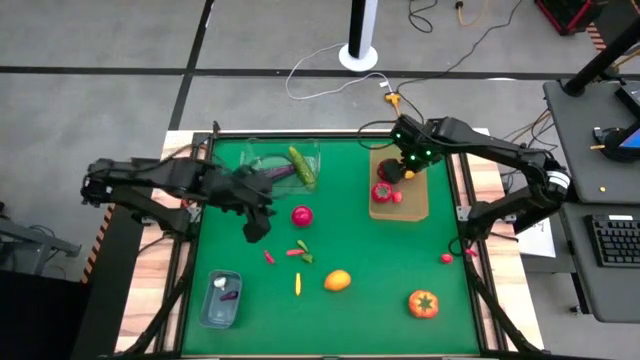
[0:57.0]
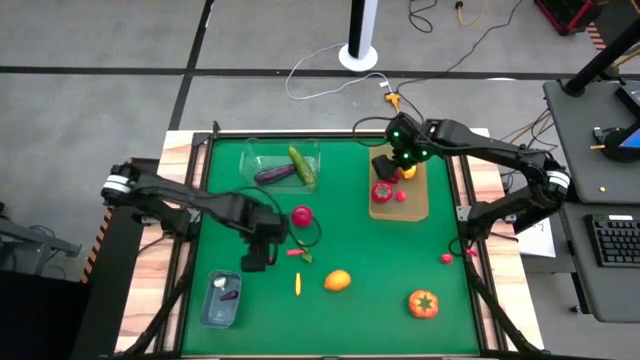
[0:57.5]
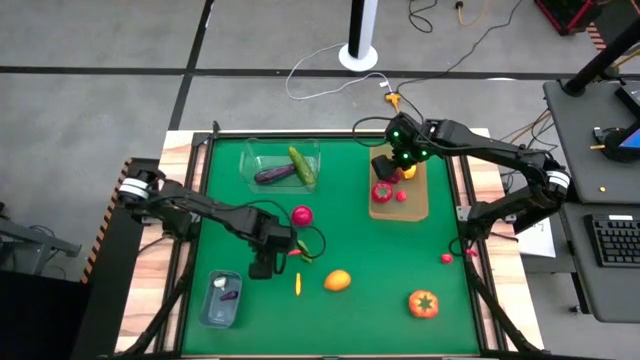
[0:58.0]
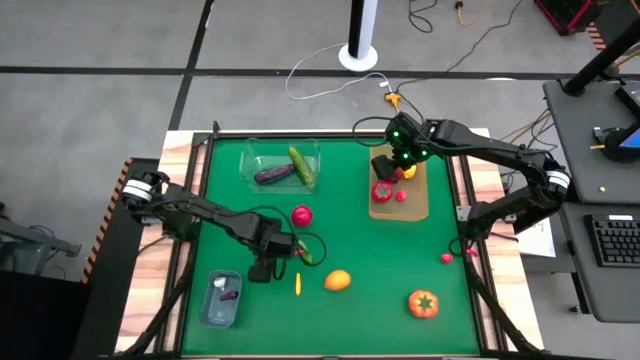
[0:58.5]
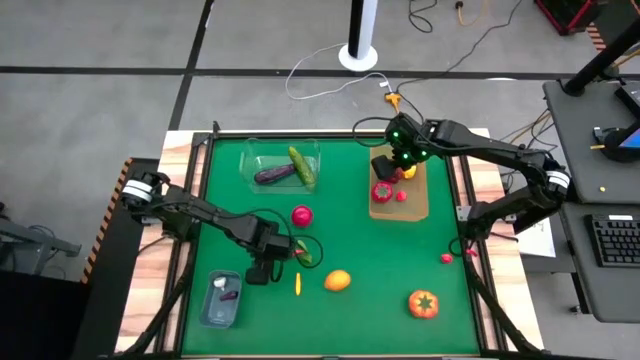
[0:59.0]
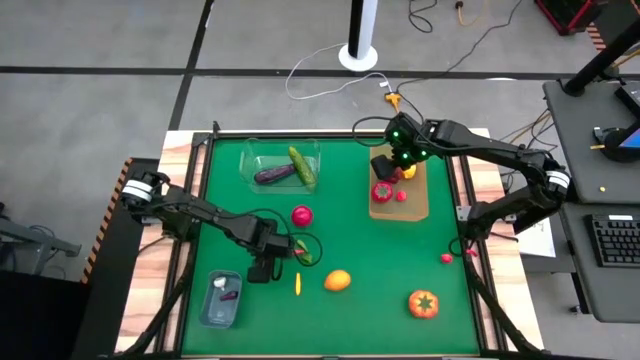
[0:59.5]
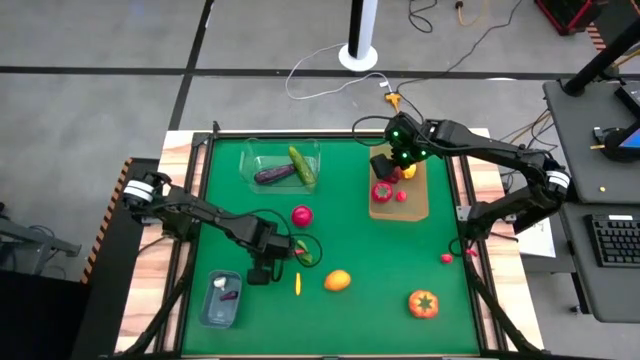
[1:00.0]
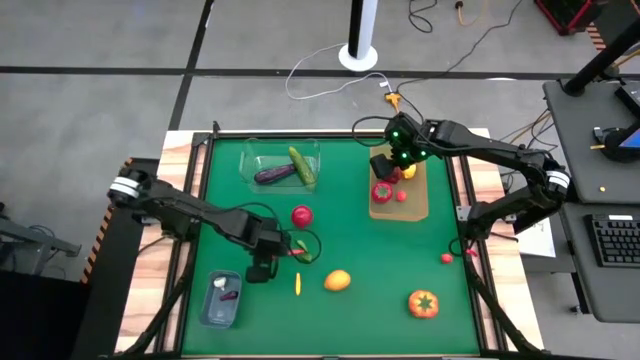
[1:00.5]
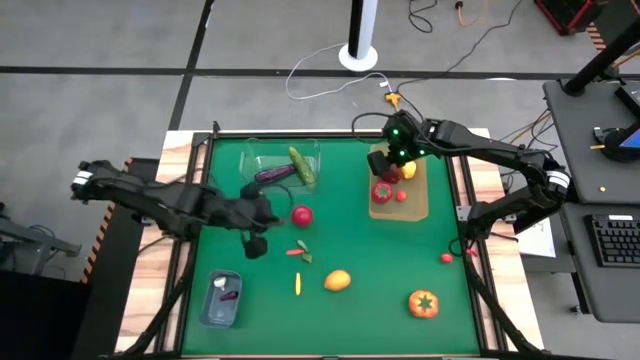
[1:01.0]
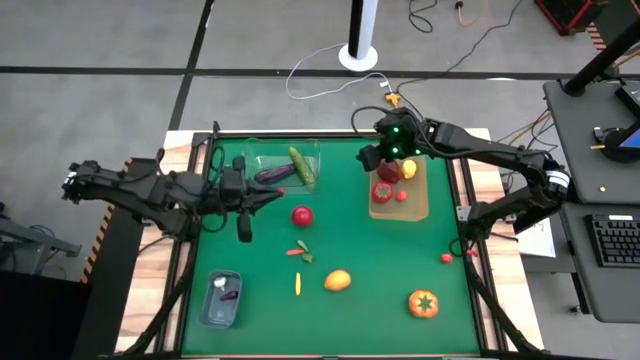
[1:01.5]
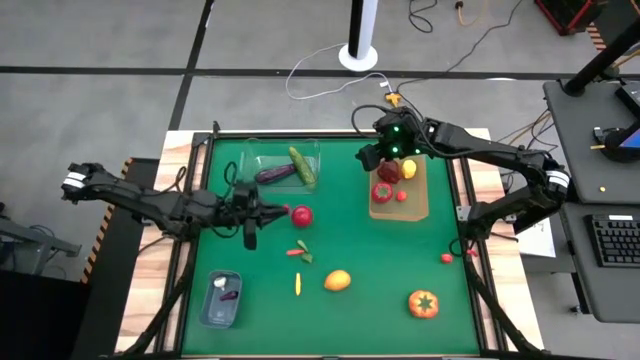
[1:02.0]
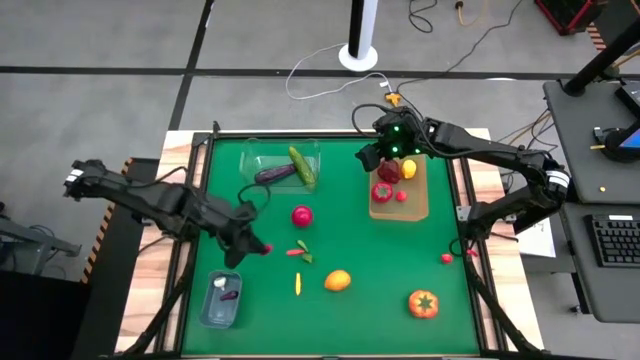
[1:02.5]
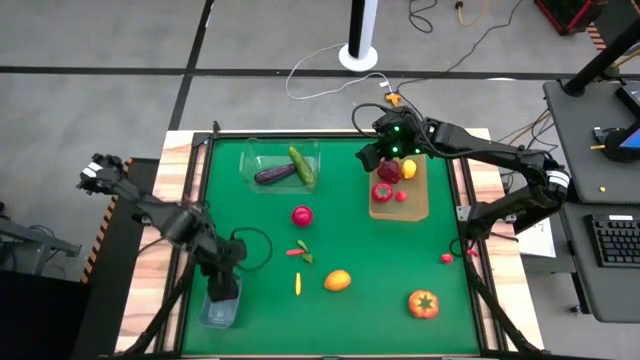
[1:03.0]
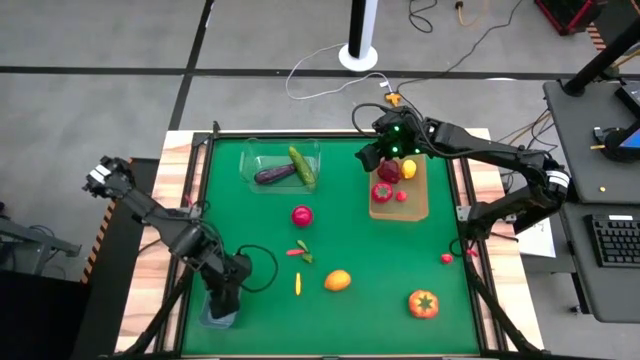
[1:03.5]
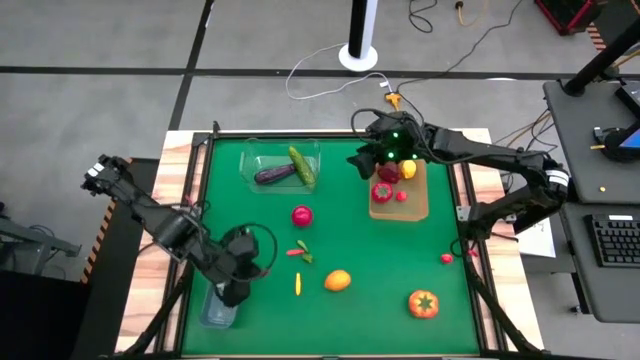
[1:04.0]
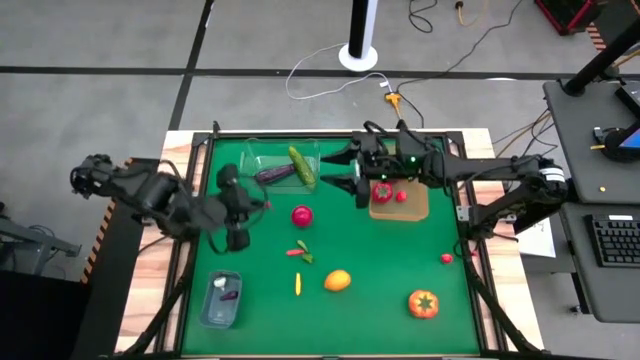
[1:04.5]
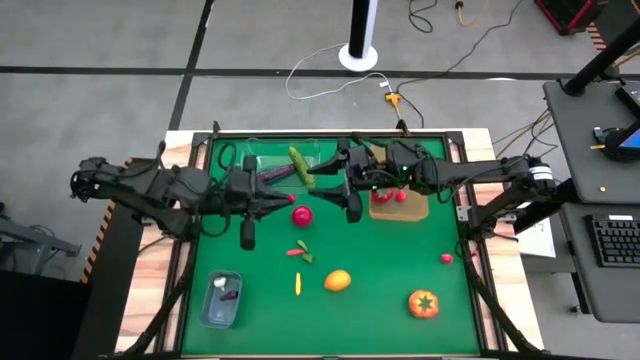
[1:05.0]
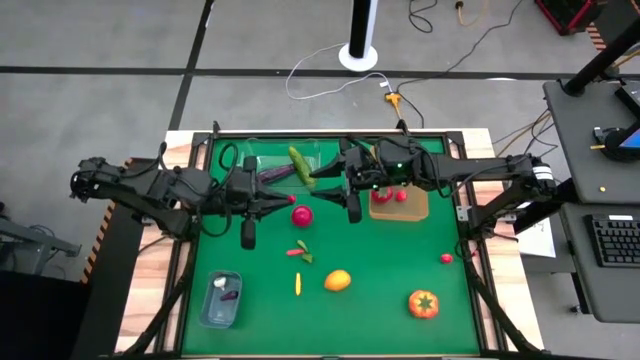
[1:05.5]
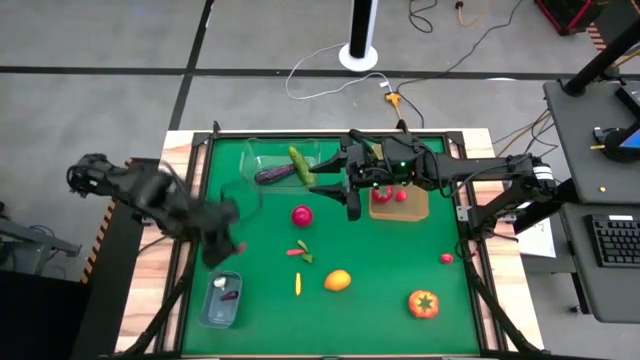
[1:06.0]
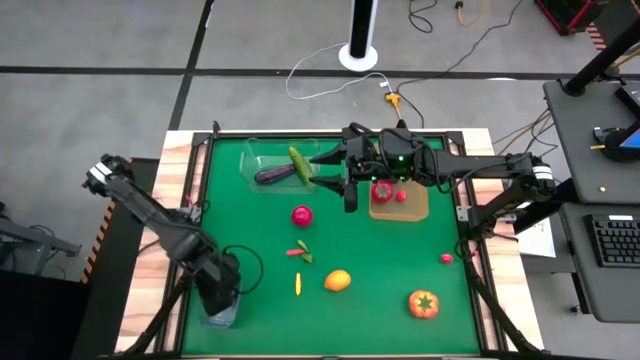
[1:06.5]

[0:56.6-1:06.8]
Task: Sort produce into baskets
Put the red chili pepper into the blue bin

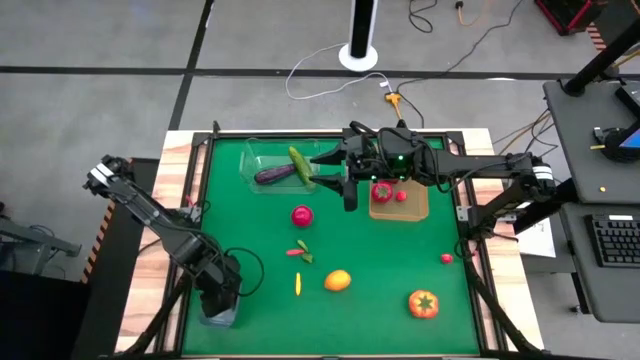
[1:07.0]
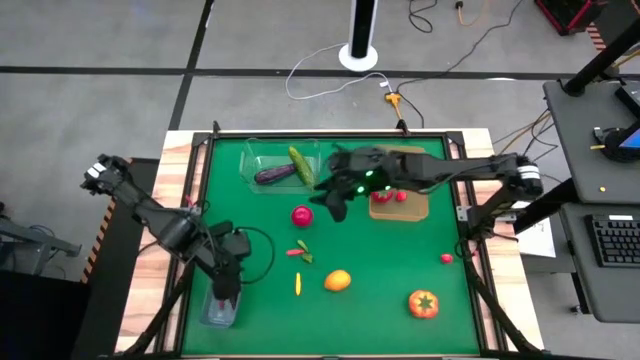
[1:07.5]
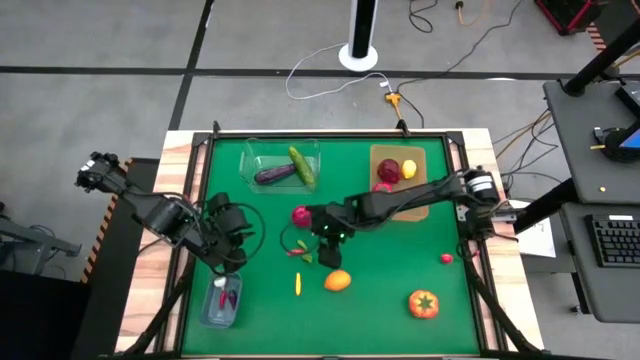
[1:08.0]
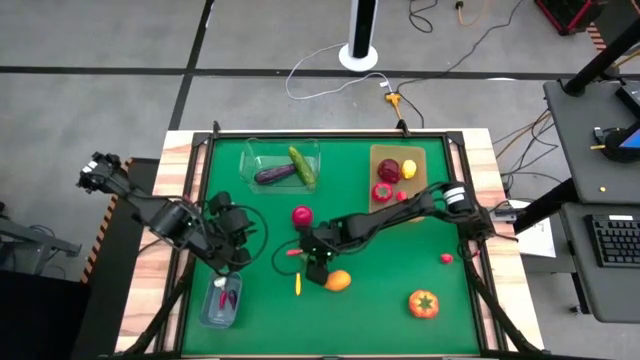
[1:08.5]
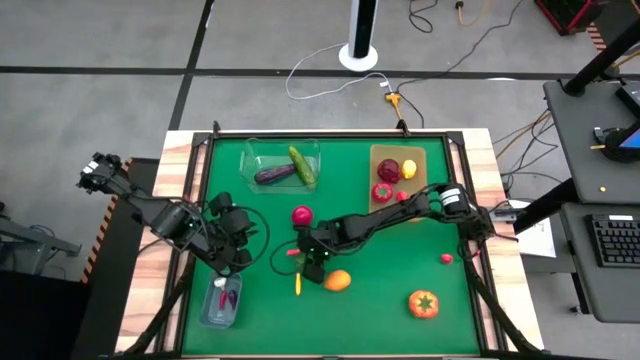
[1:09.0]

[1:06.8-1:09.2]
Put the green bell pepper into the blue bin

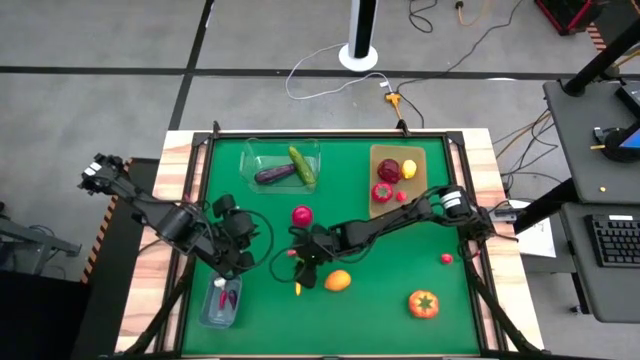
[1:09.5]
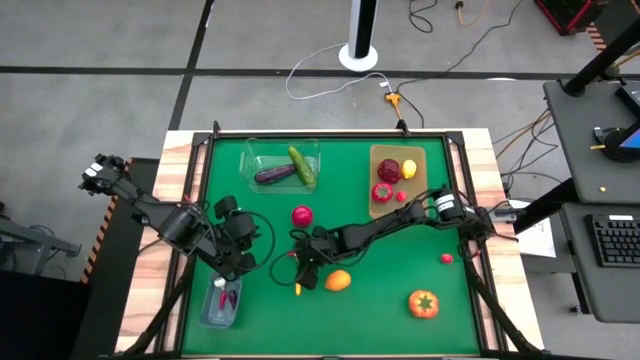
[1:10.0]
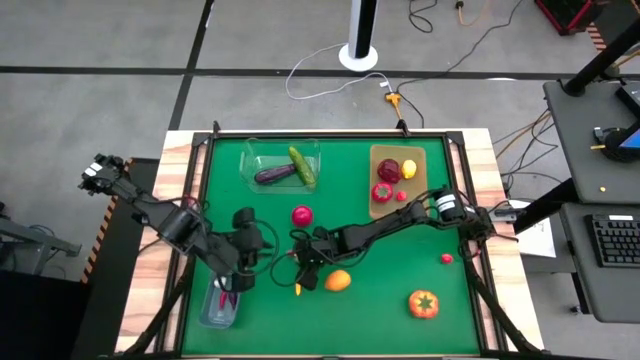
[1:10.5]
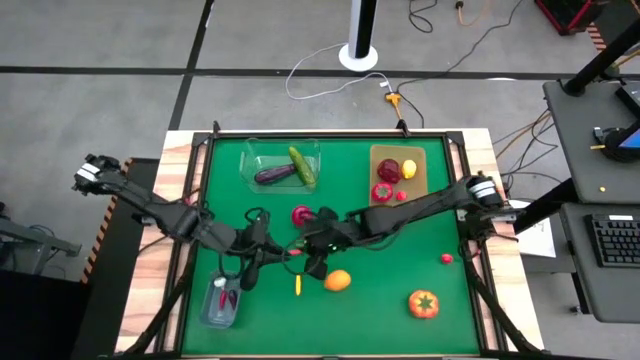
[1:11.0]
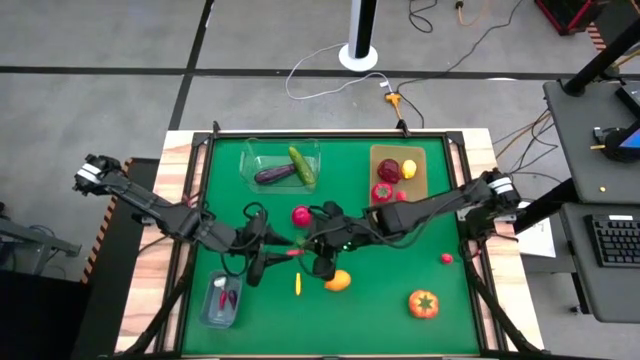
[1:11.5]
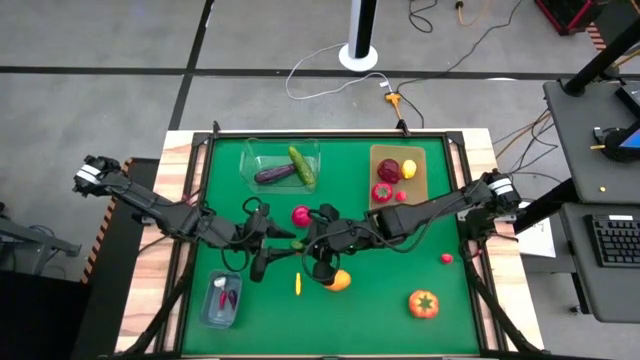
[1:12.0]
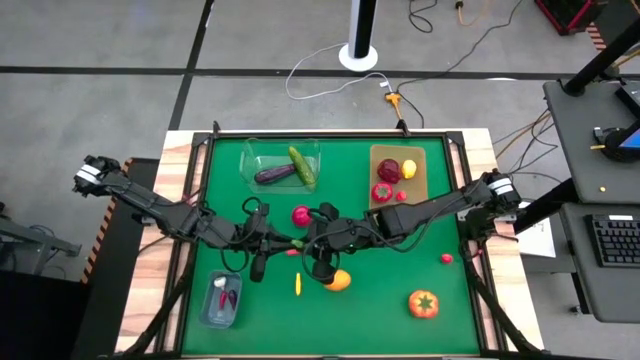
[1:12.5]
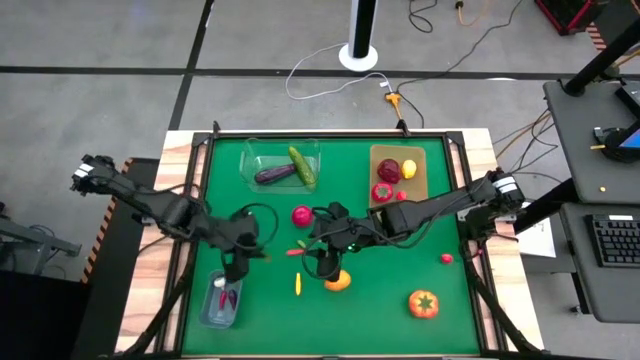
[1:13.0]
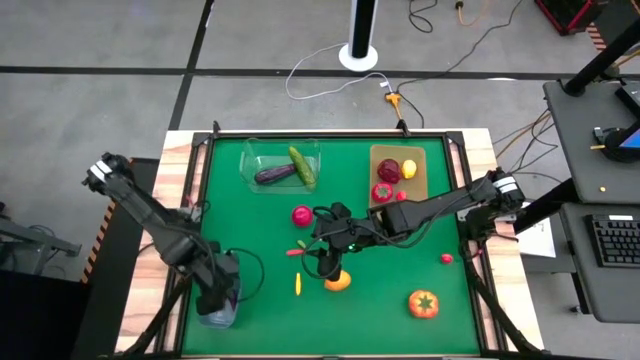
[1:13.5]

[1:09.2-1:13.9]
Put the green bell pepper into the blue bin

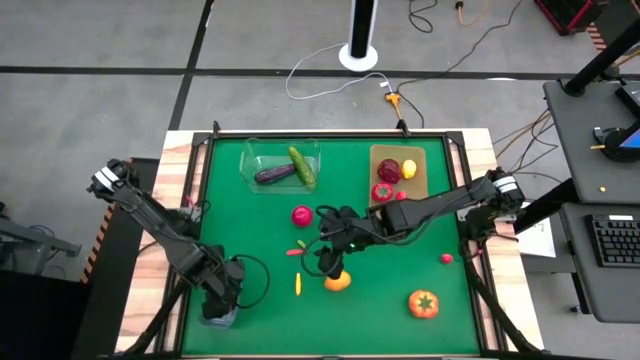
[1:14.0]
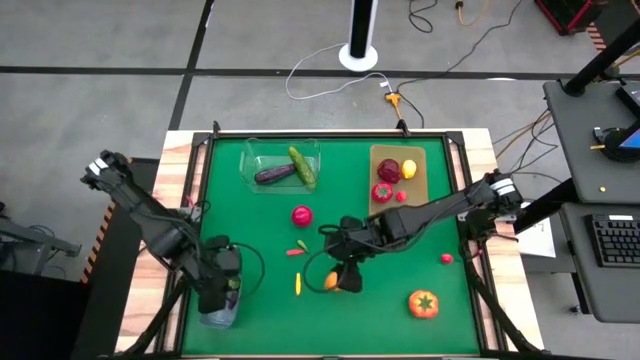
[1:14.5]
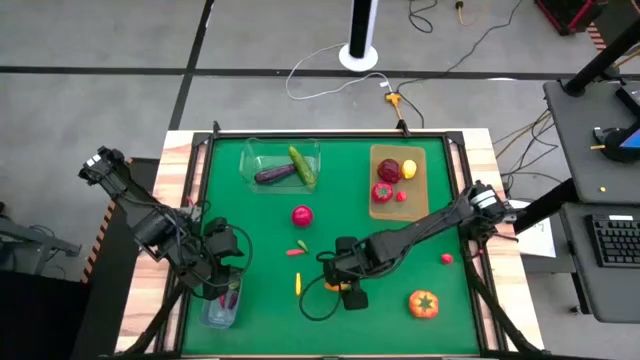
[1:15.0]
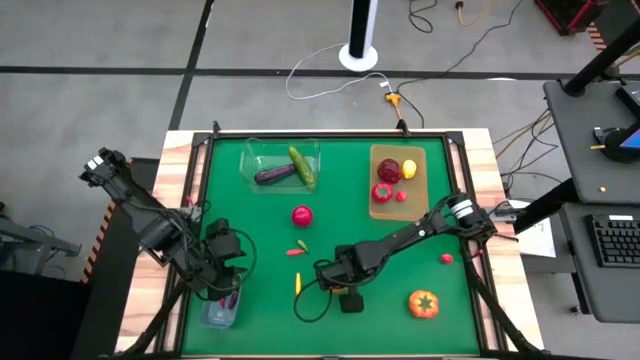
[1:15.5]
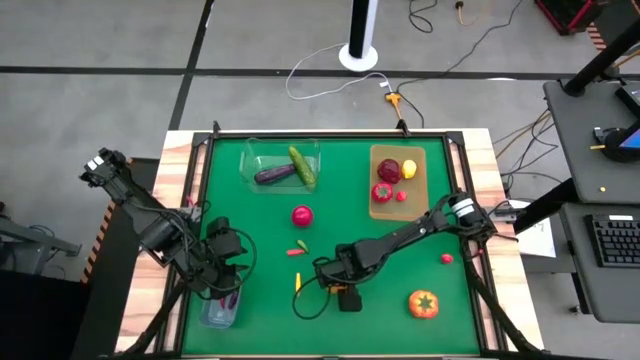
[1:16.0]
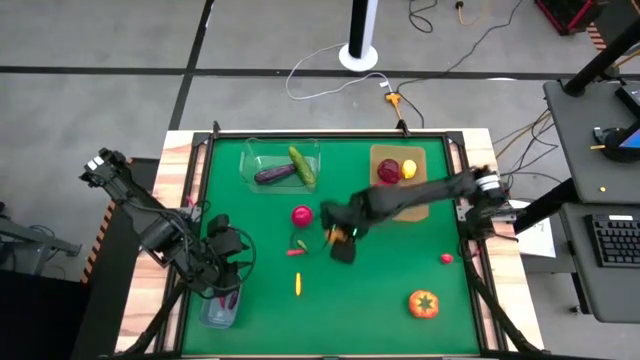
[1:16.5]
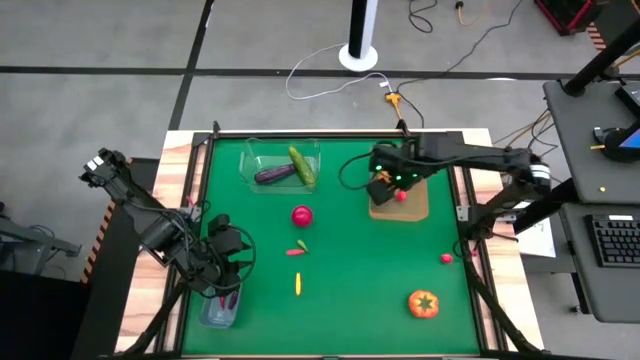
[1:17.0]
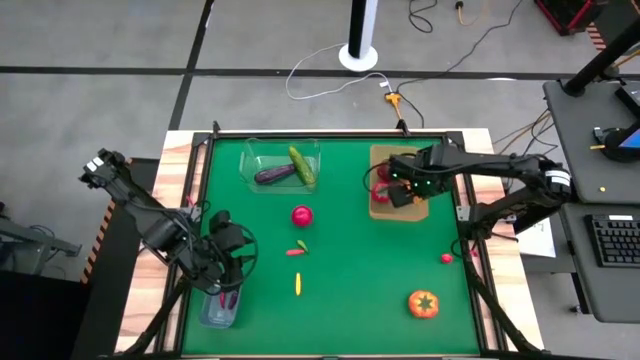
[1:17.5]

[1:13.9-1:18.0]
Put the yellow lemon into the orange bin

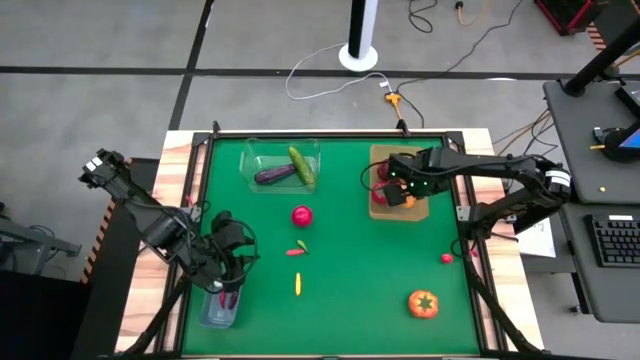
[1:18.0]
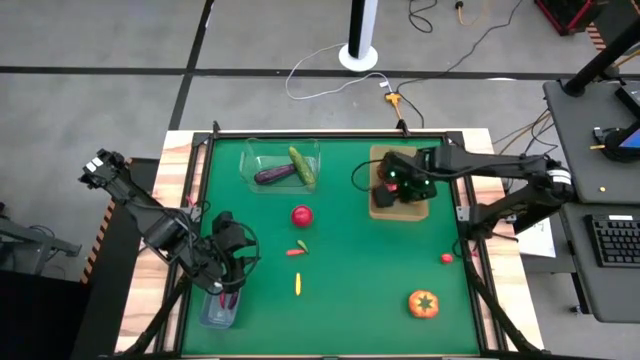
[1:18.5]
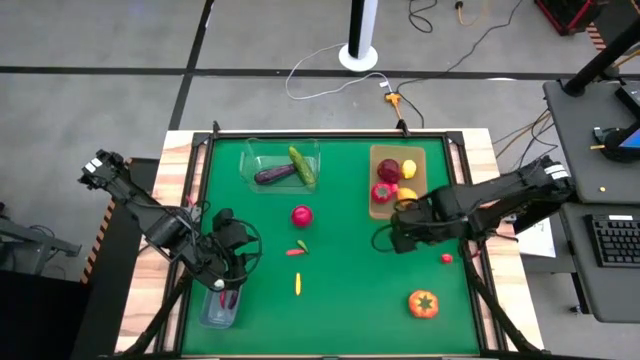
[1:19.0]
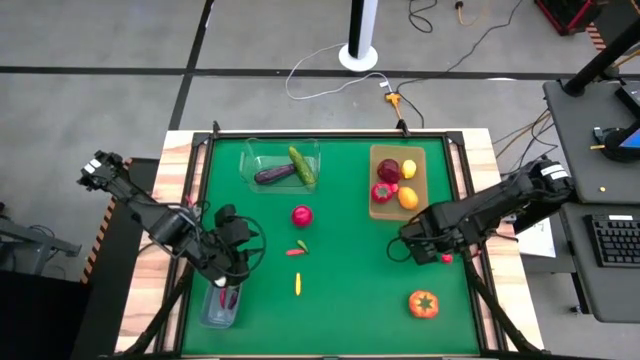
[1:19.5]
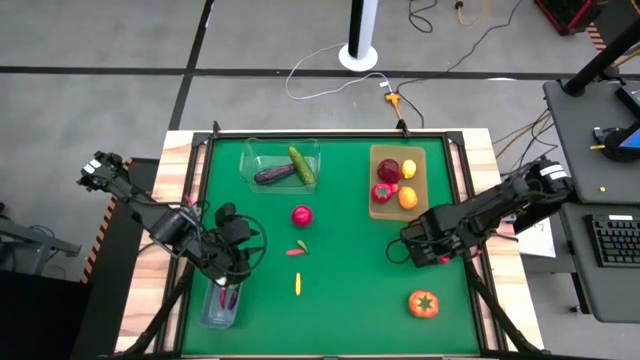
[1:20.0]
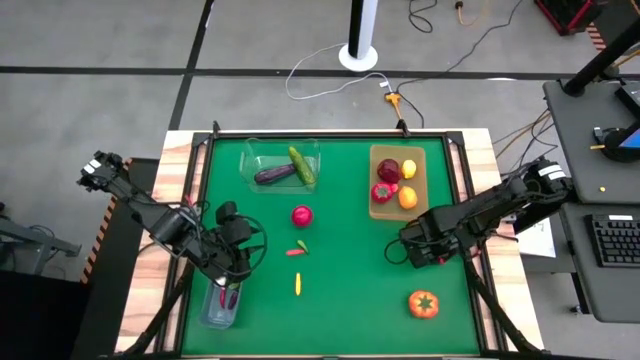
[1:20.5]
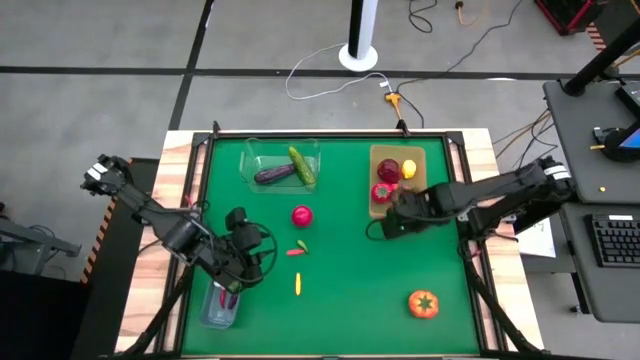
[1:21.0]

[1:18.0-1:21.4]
Put the orange peach into the orange bin
